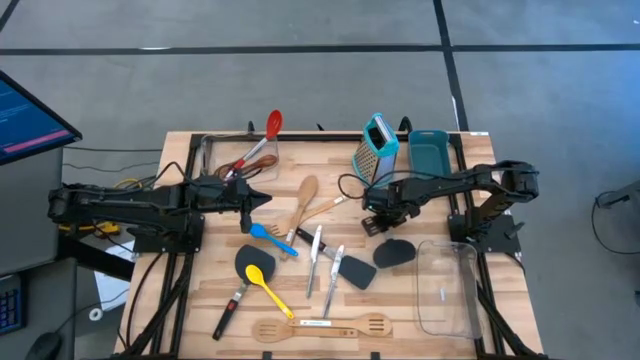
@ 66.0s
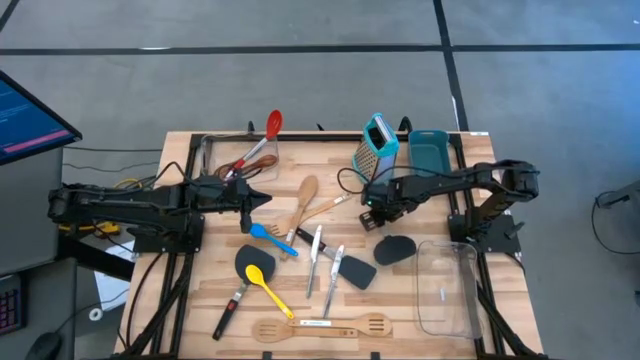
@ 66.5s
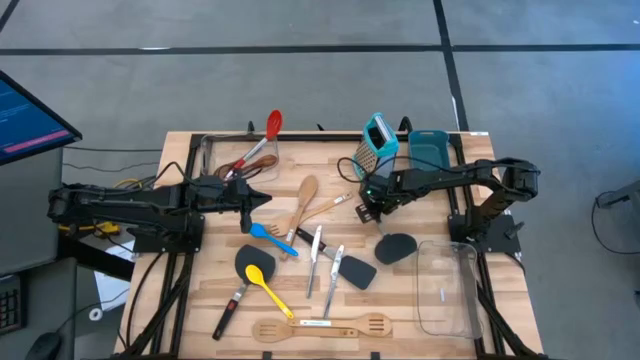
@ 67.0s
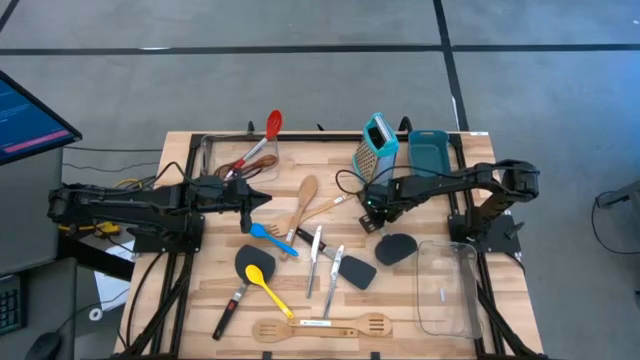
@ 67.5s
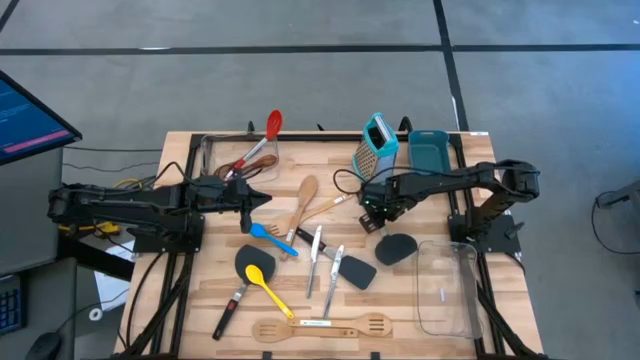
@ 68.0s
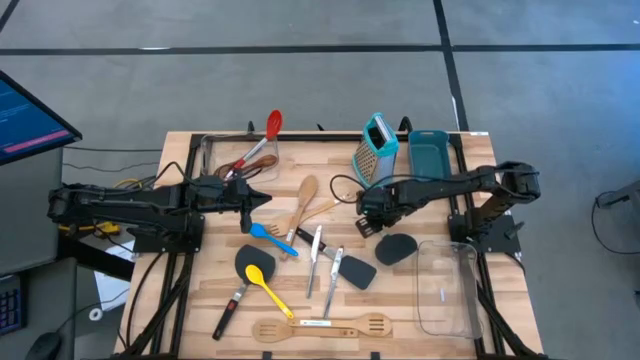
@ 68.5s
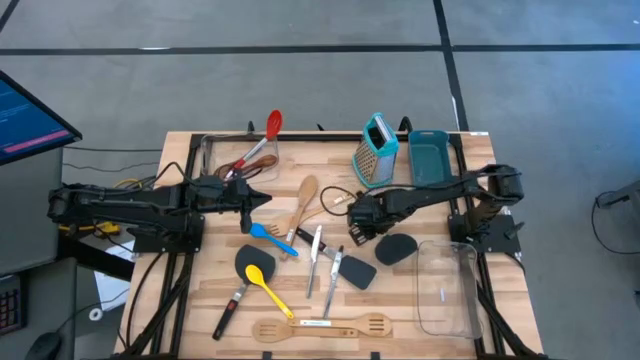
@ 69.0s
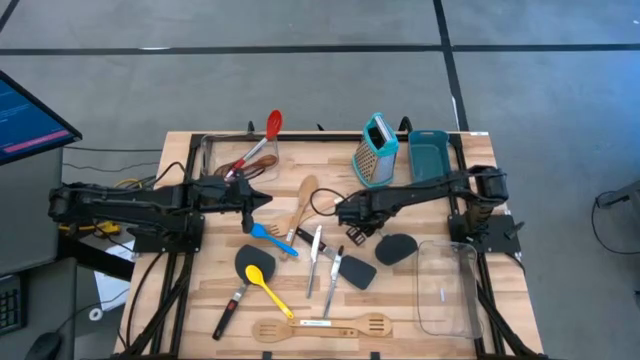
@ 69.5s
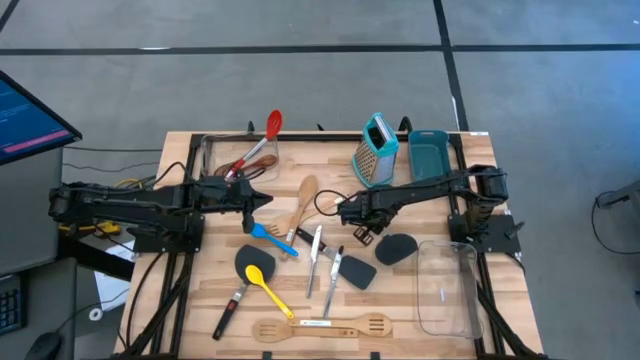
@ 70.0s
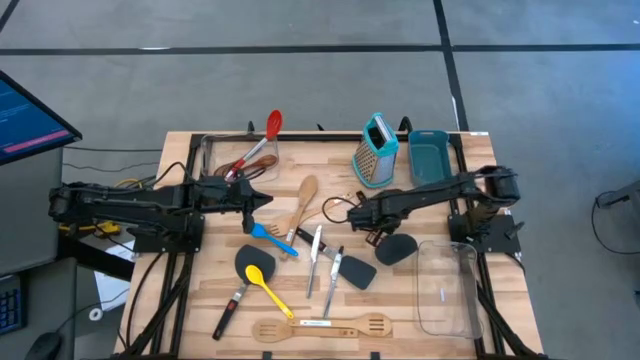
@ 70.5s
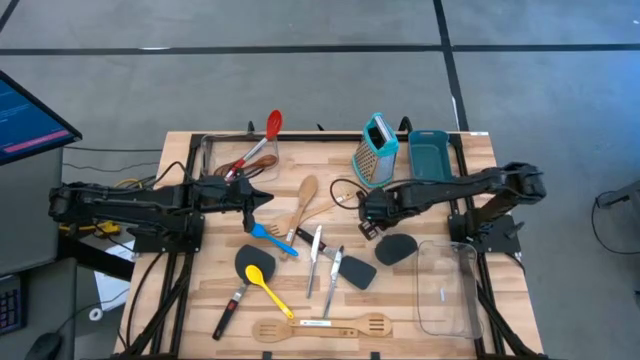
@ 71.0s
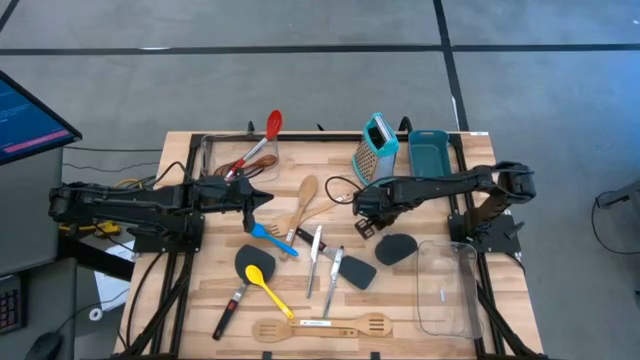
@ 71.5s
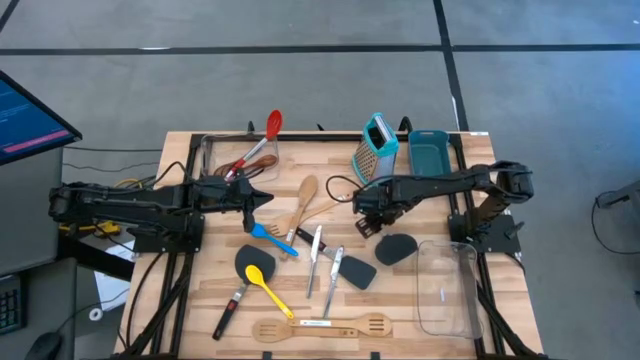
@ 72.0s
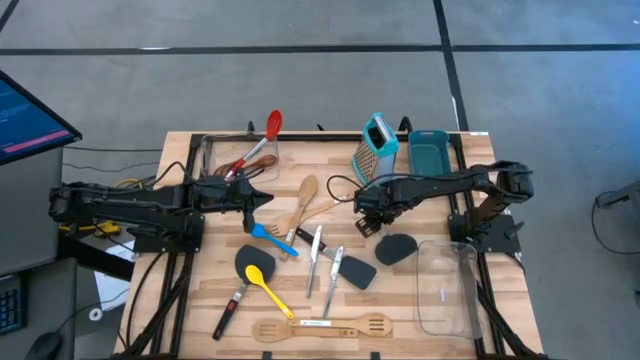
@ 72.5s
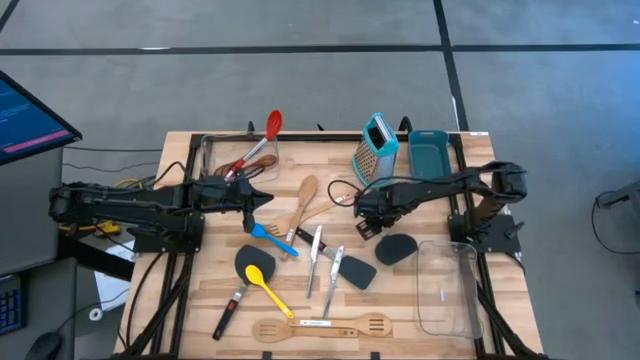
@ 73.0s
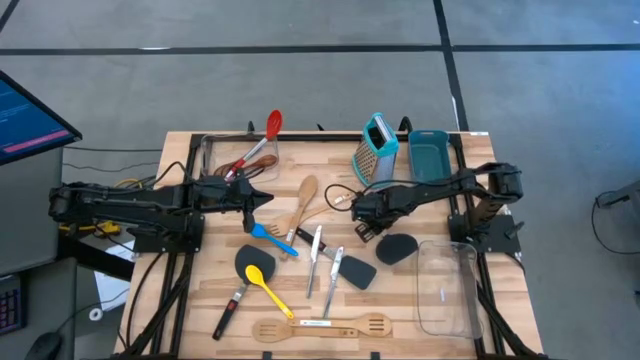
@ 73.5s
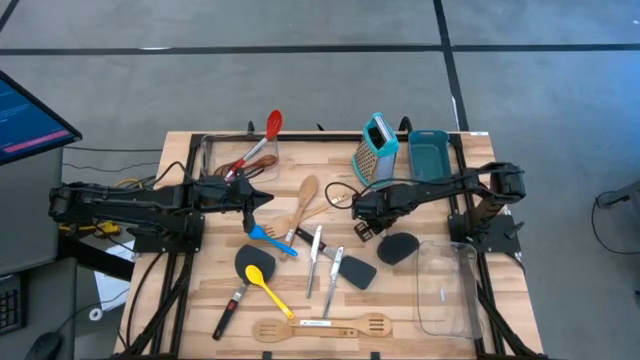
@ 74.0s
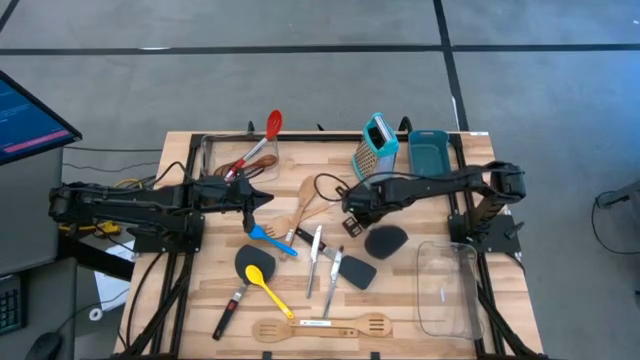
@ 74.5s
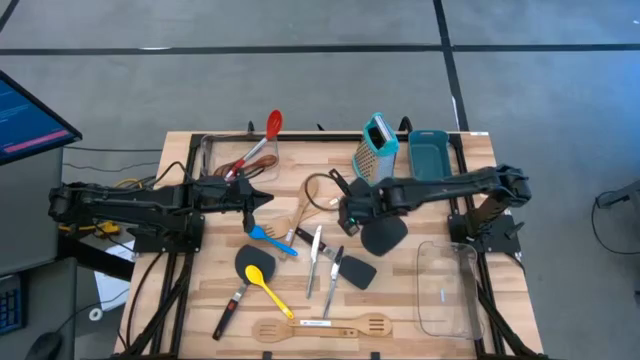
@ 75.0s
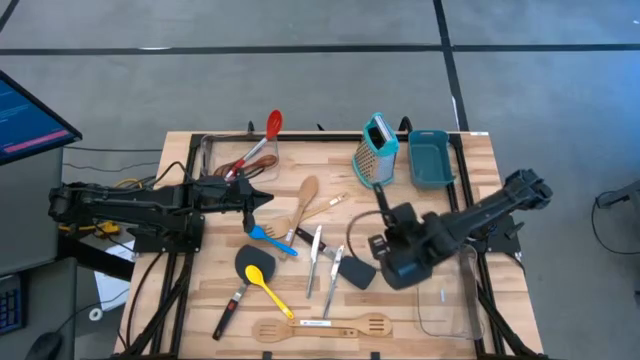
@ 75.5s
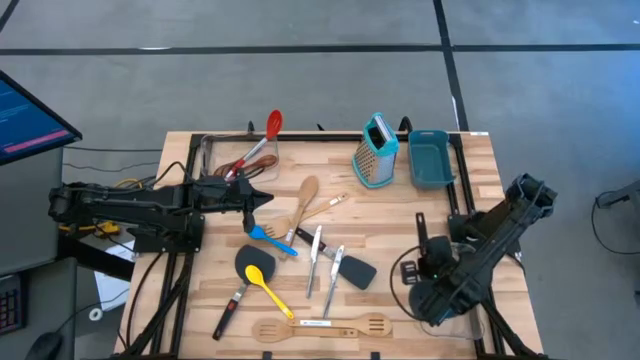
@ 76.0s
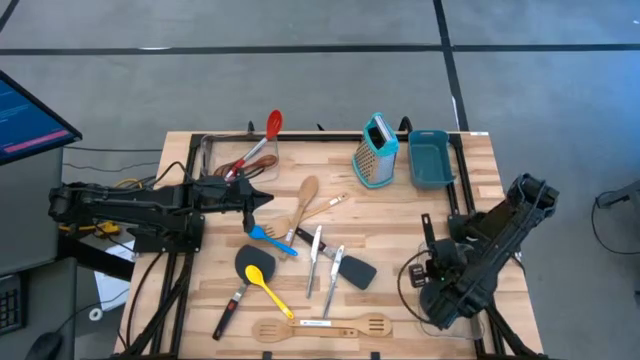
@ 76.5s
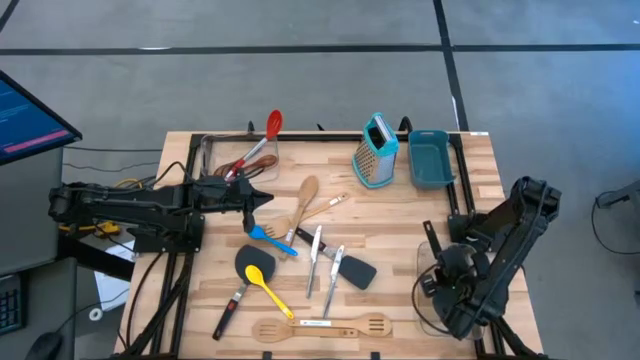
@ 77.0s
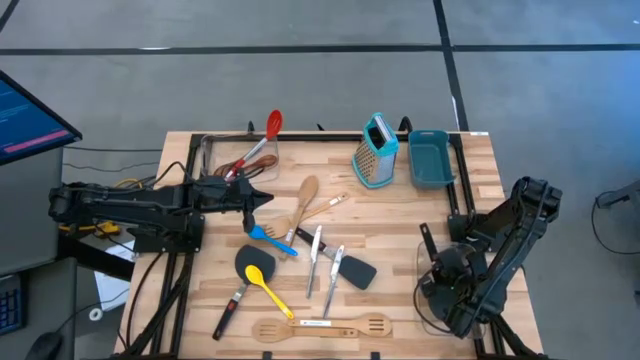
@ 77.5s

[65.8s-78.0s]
Task: Pick & Place Kitchen Items
Put the top right black turner spatula into the right transparent bin

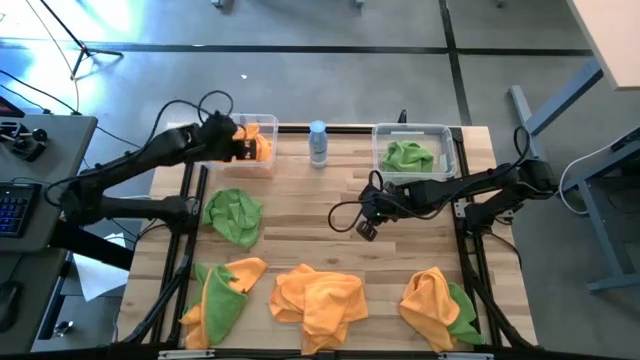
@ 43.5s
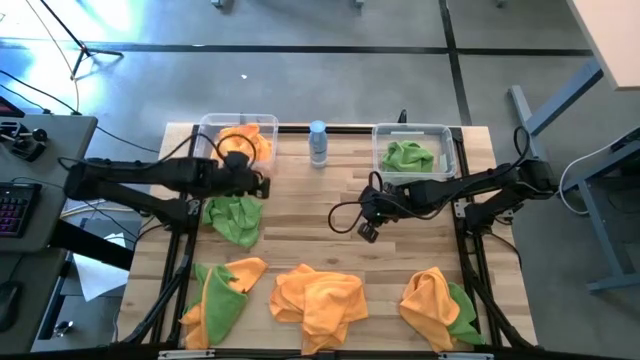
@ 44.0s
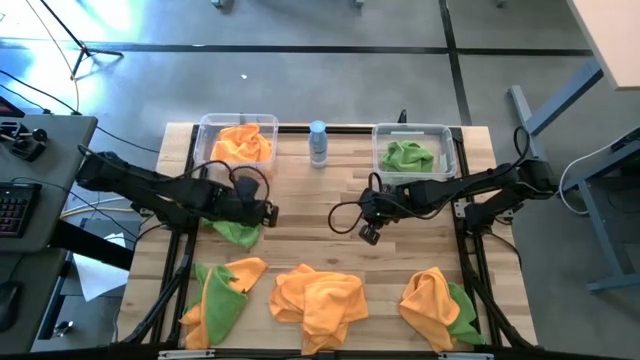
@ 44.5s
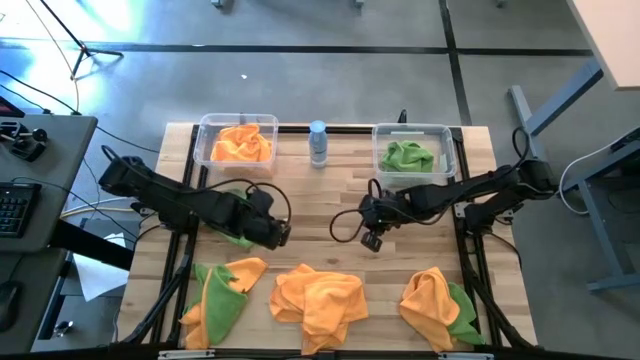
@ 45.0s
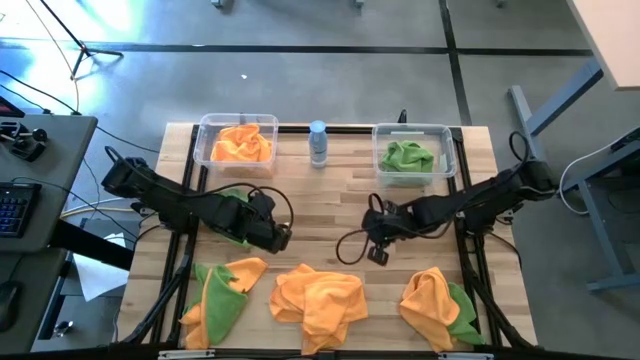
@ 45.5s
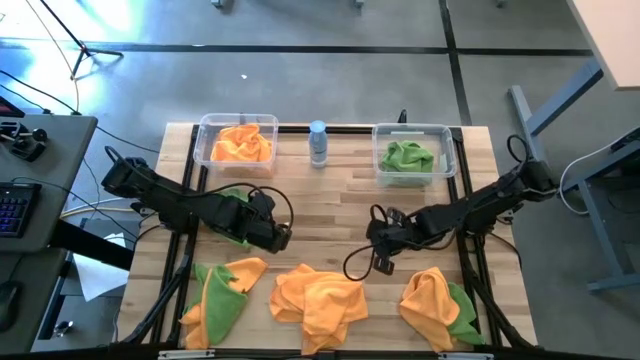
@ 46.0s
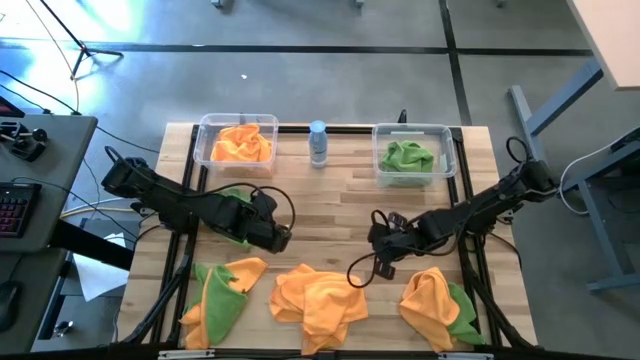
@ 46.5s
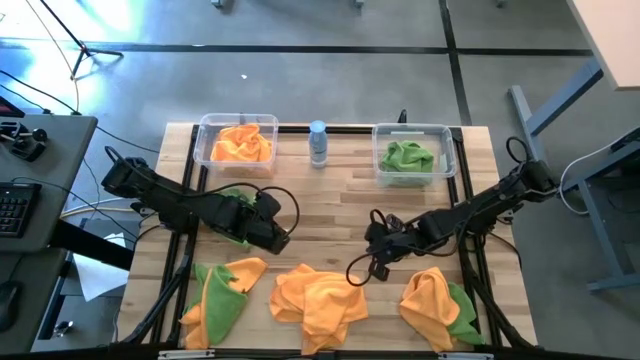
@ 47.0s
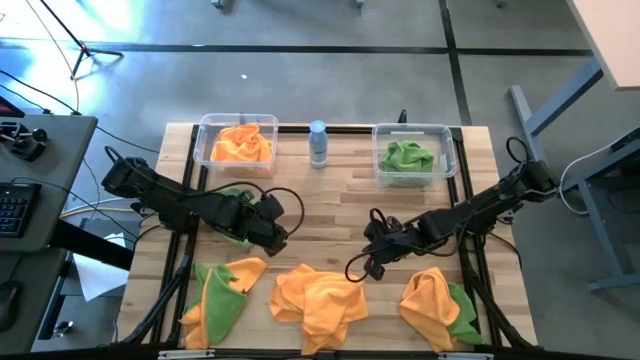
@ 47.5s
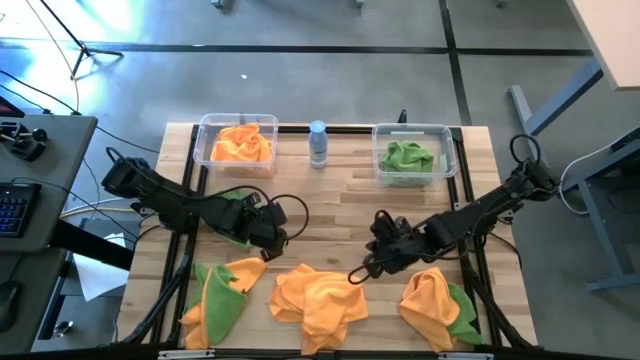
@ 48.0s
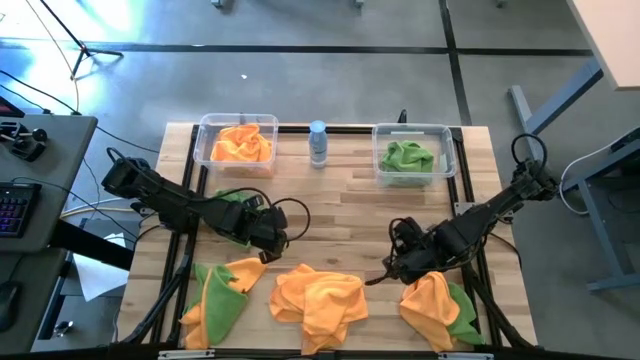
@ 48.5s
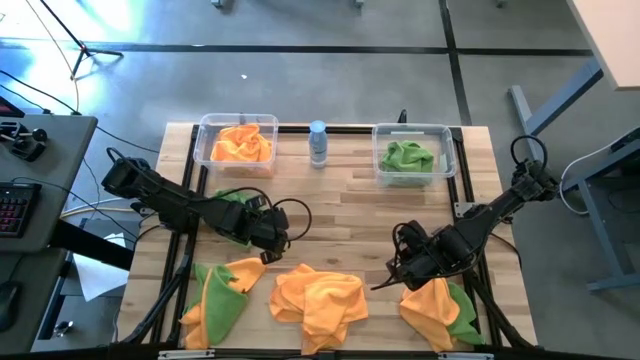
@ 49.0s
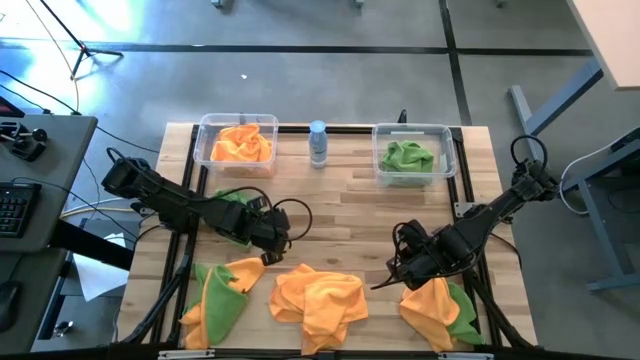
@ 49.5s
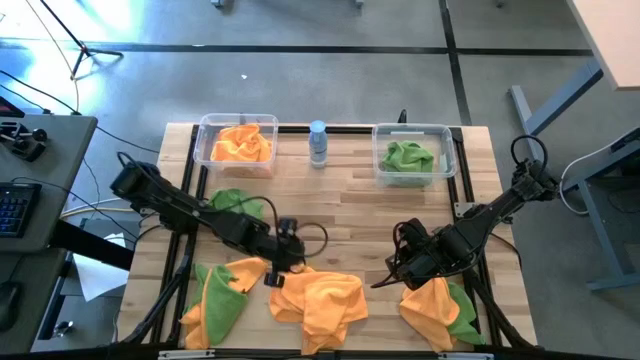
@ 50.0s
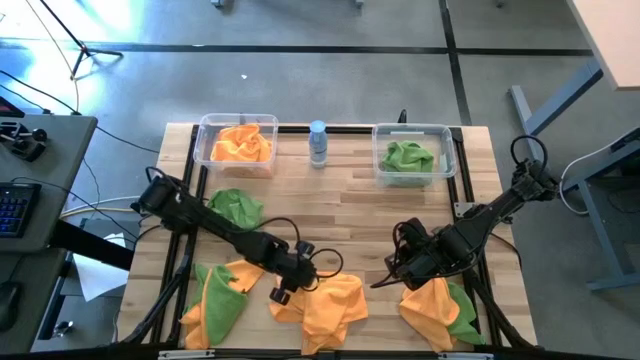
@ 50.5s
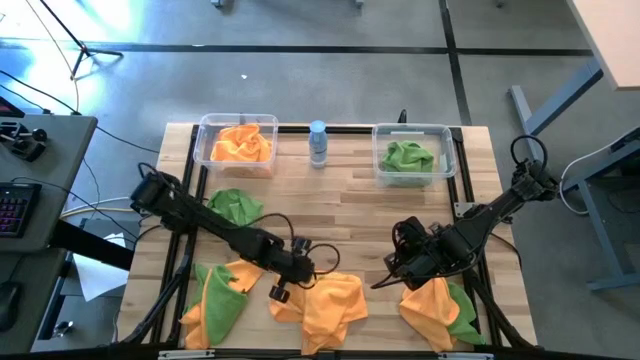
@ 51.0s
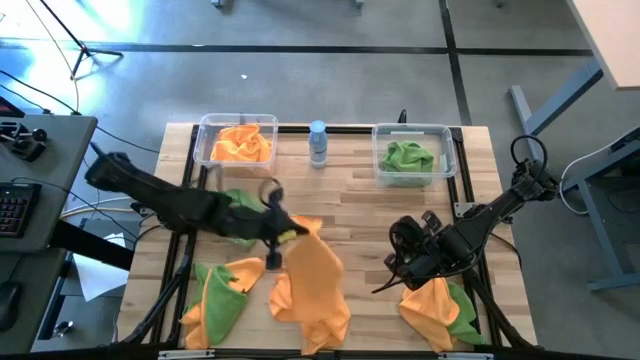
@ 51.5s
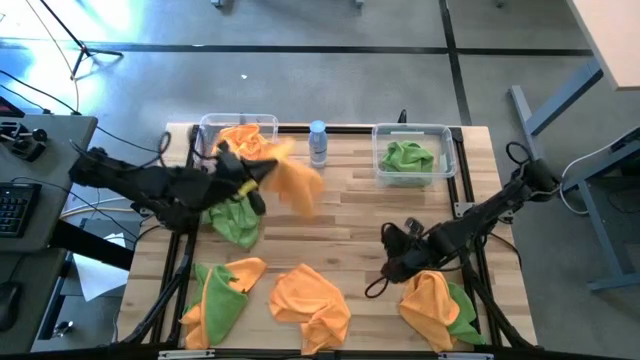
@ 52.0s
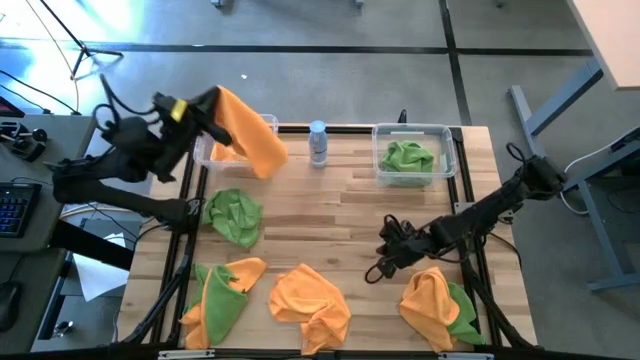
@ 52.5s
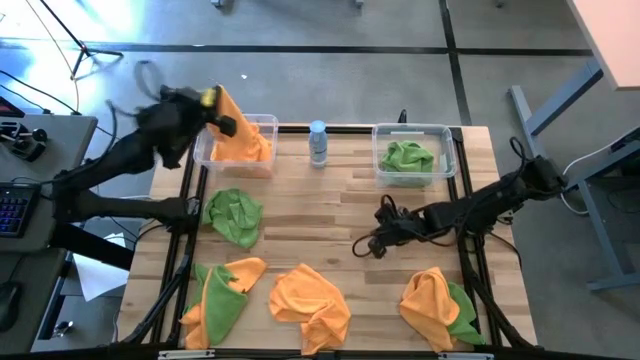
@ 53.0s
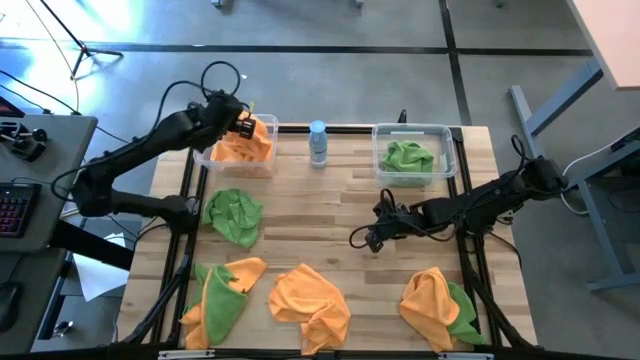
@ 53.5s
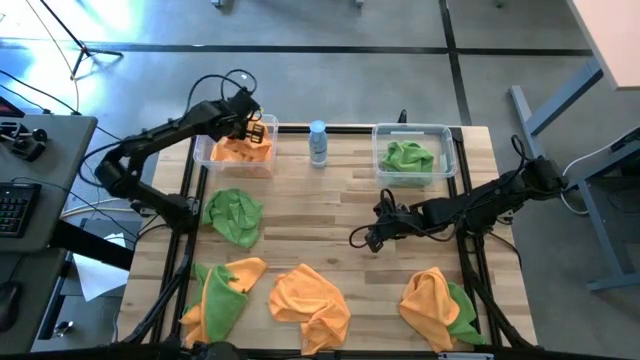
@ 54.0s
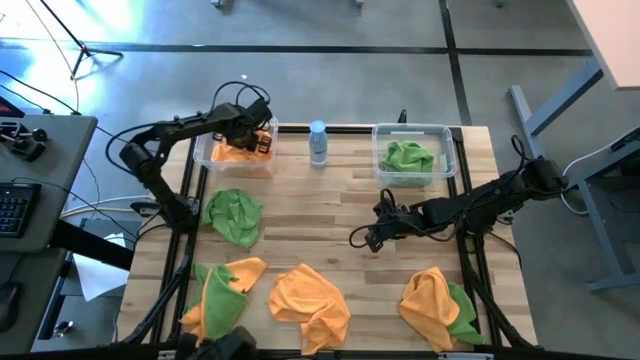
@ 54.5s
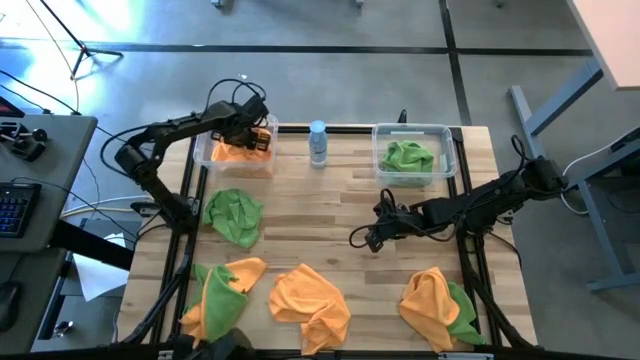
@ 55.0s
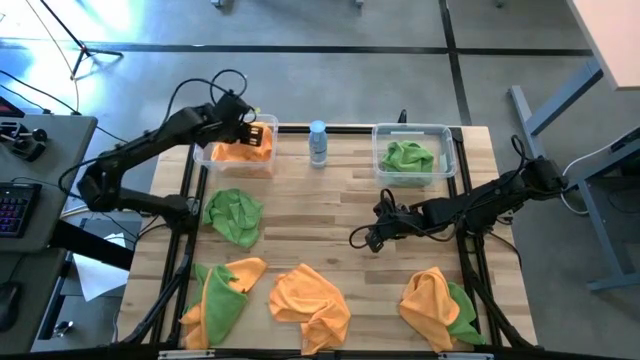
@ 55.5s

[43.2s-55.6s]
Task: Sort microfiber towel by color & place in baskets
Put the orange towel into the left transparent bin
